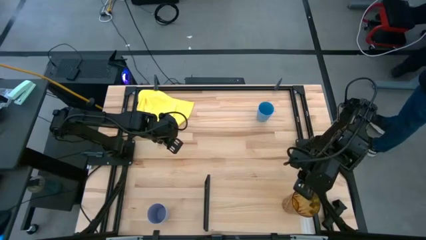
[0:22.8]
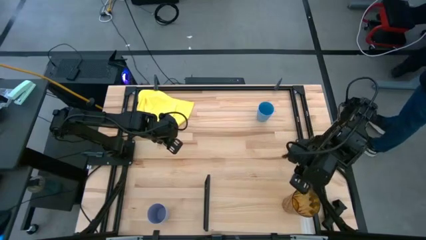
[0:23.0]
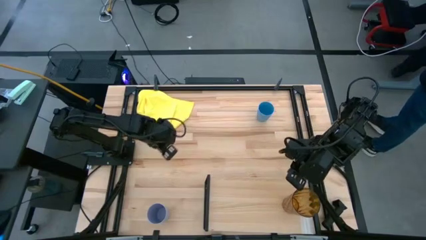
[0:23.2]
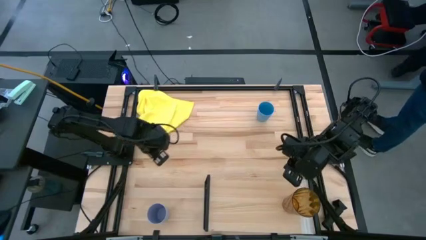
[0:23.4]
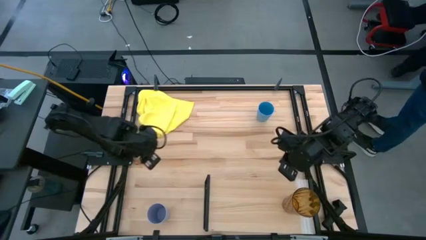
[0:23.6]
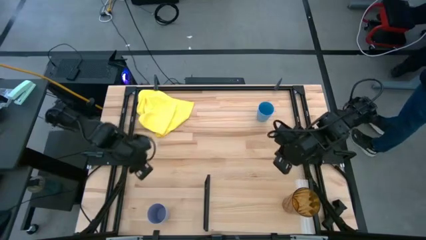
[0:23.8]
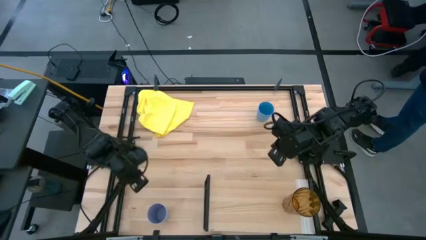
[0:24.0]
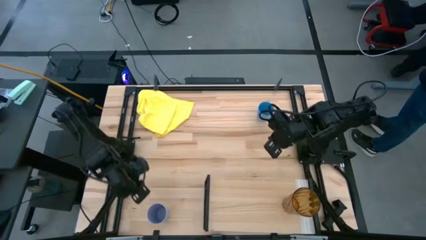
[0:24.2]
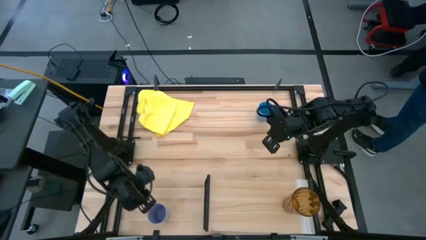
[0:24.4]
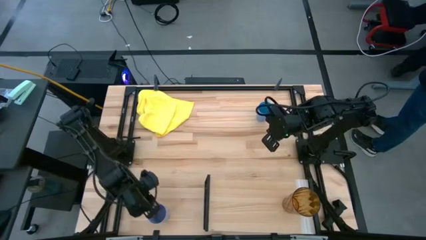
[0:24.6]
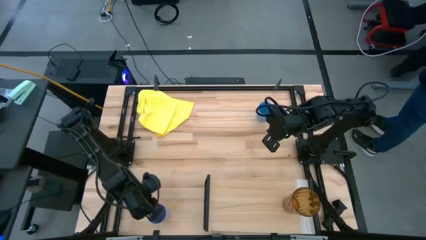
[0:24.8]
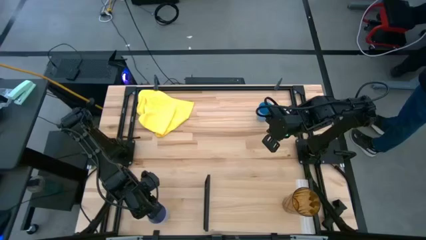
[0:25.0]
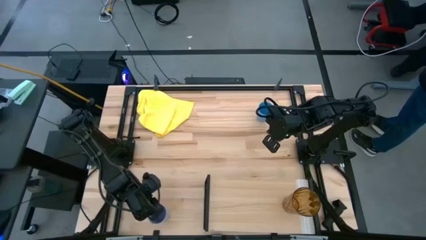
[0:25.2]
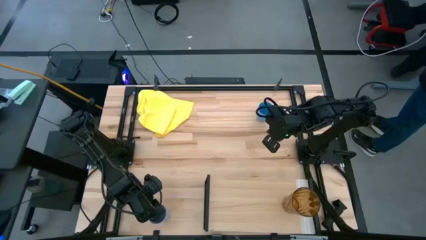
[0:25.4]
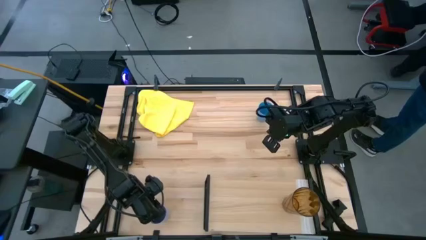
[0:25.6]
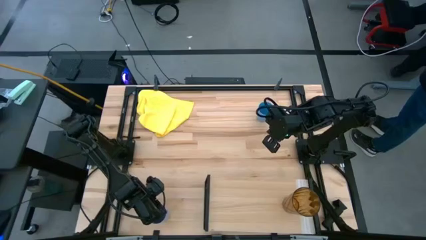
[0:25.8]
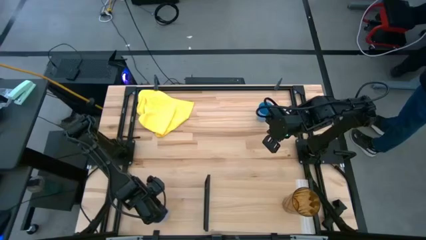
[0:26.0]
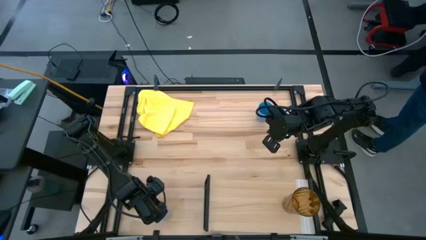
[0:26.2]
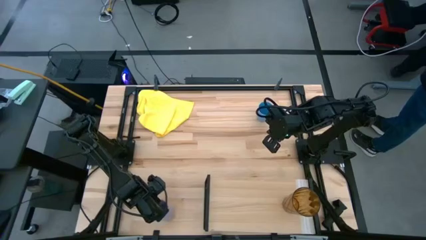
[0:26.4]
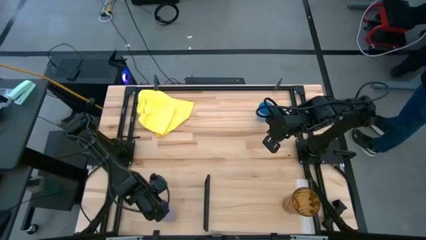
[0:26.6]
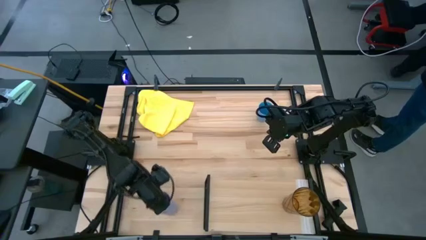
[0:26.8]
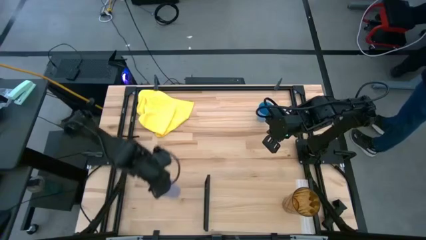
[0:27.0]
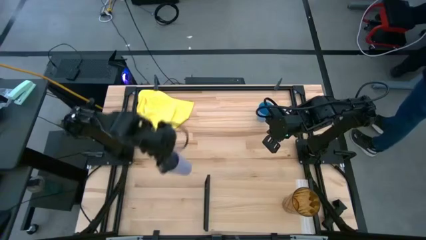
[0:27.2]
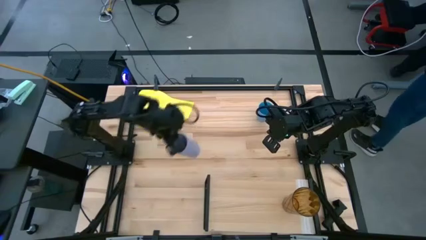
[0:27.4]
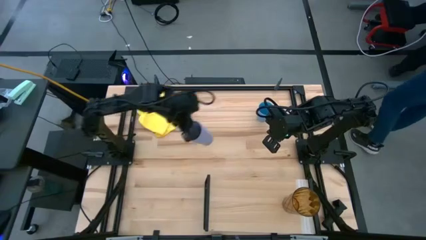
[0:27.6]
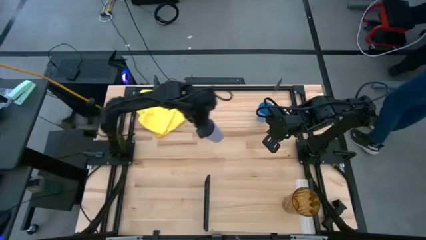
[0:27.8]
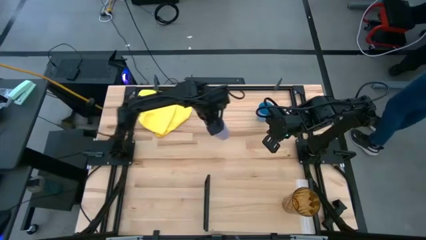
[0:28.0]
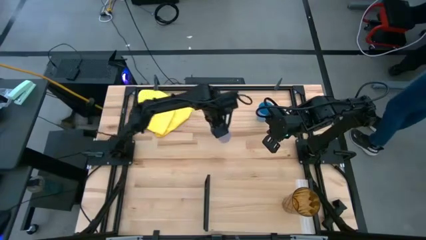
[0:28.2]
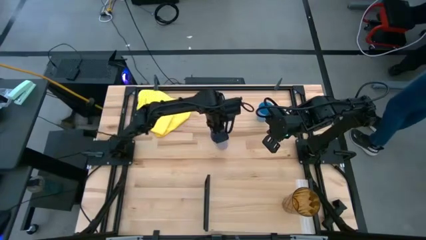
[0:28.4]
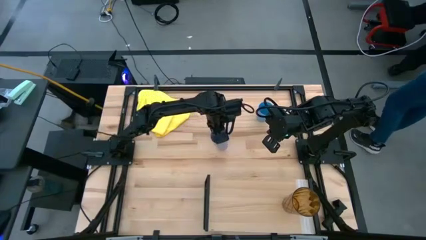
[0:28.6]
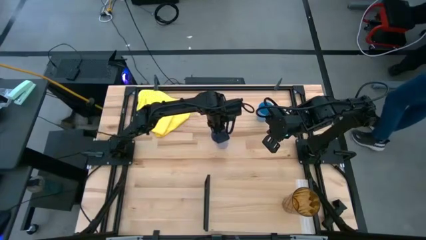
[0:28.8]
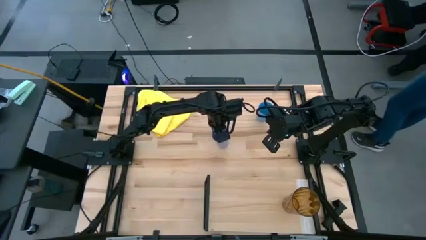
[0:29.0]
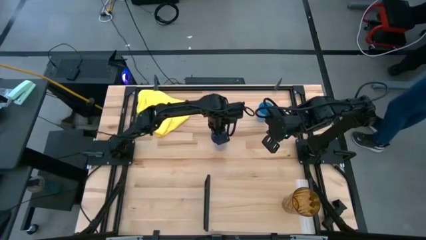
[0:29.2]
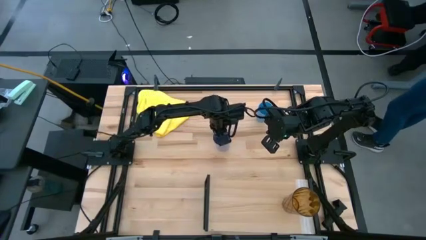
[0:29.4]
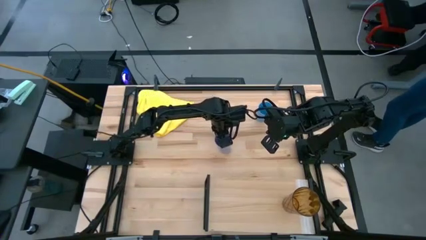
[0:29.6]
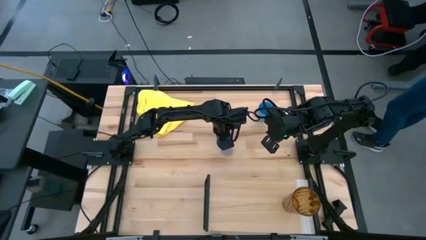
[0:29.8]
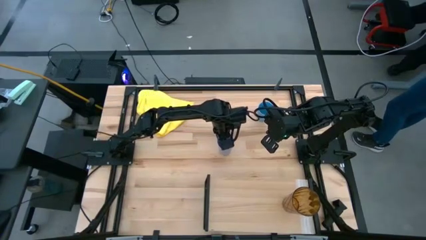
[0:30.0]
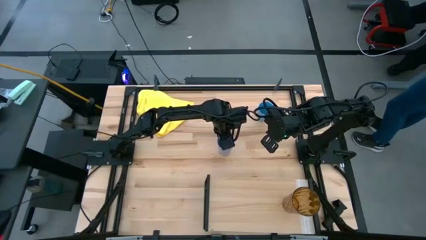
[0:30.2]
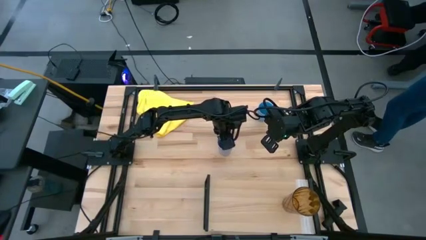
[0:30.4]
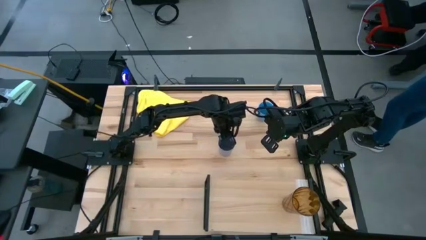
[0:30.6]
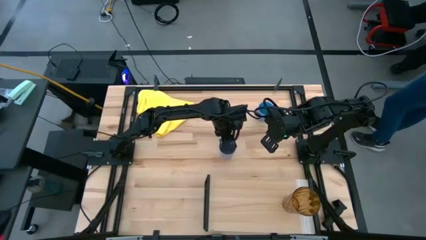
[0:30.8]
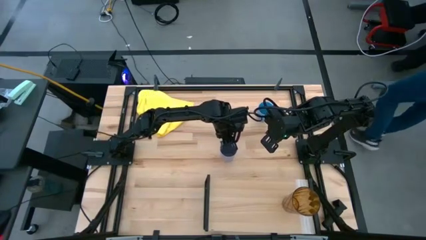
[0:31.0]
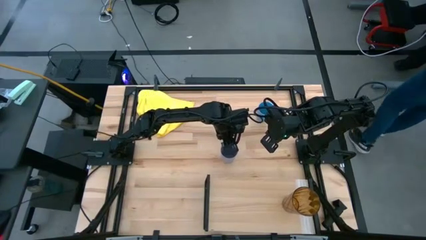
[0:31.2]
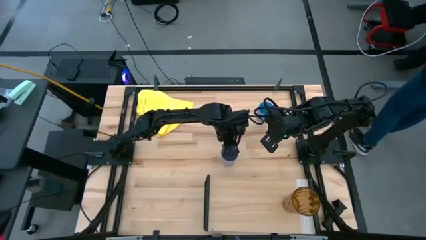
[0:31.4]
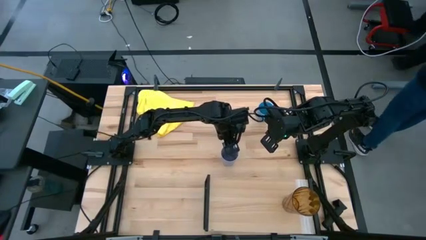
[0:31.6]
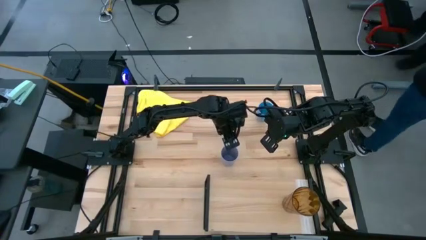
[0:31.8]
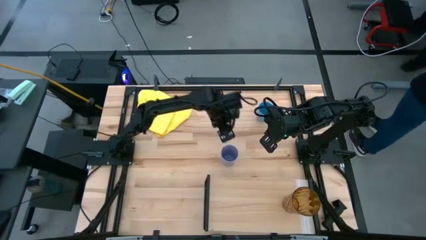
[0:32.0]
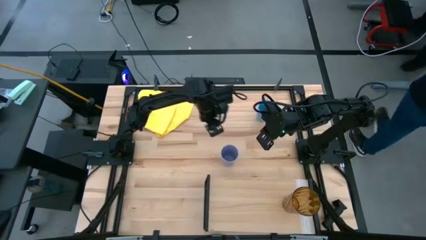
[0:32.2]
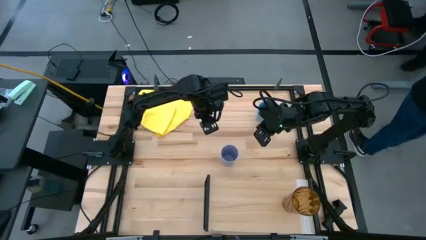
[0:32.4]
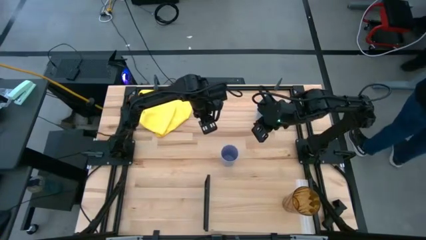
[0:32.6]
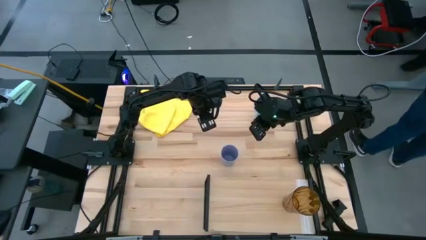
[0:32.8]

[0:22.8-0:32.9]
Task: Stack small to large cups/mugs on shelf
Put the purple cup on the shelf

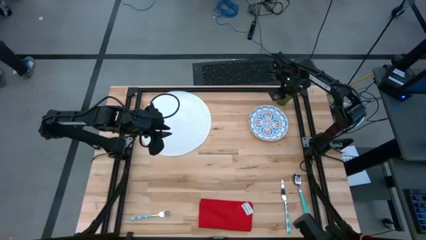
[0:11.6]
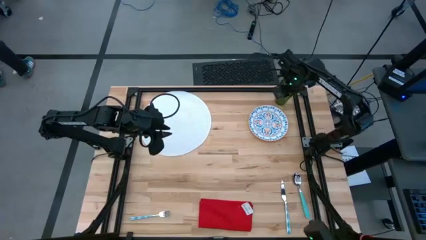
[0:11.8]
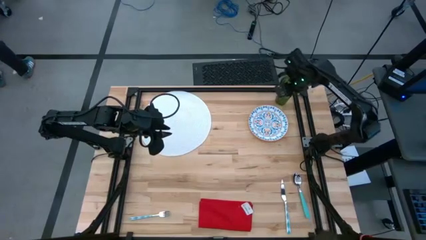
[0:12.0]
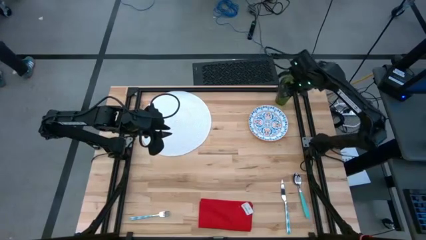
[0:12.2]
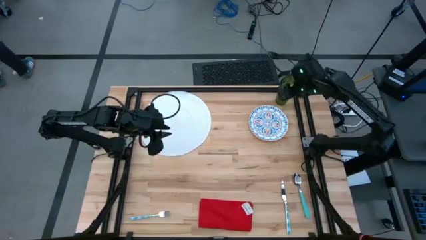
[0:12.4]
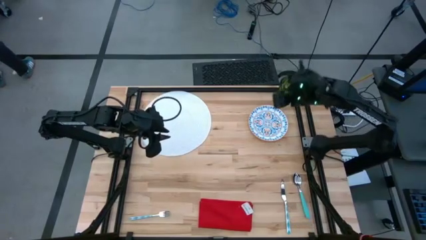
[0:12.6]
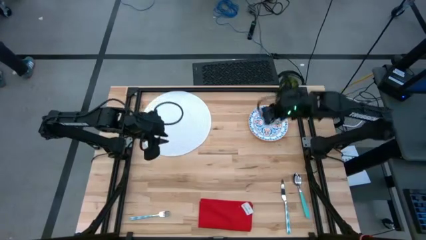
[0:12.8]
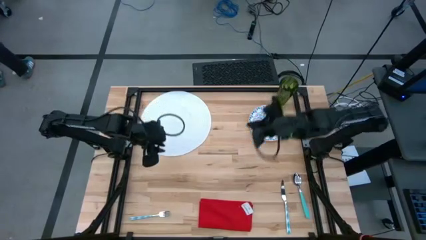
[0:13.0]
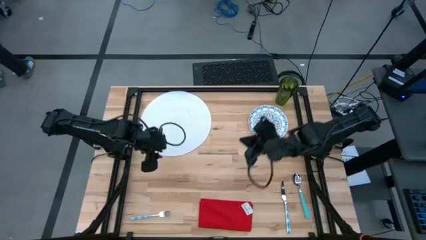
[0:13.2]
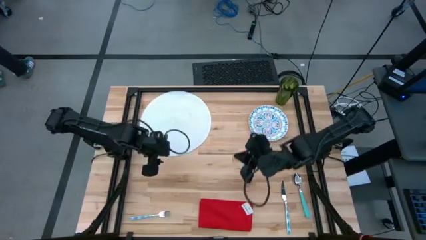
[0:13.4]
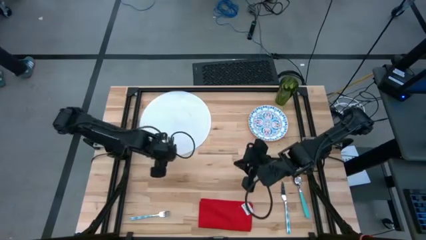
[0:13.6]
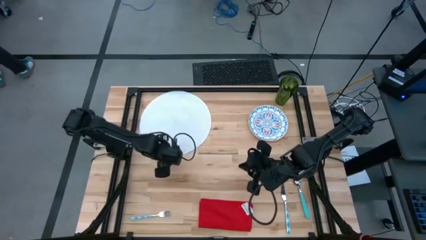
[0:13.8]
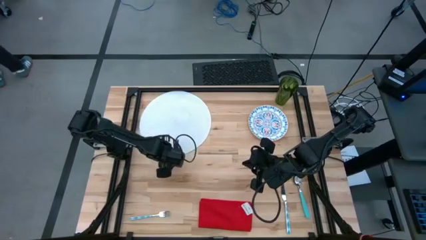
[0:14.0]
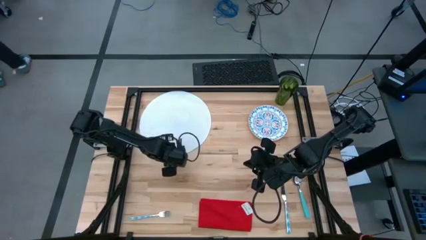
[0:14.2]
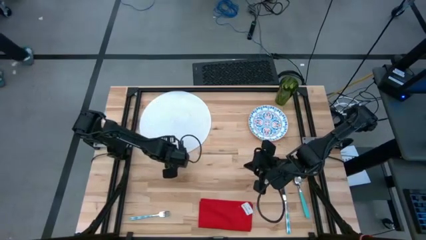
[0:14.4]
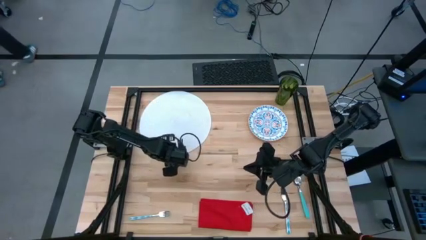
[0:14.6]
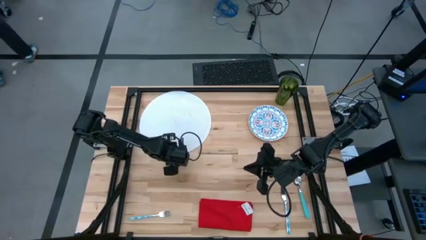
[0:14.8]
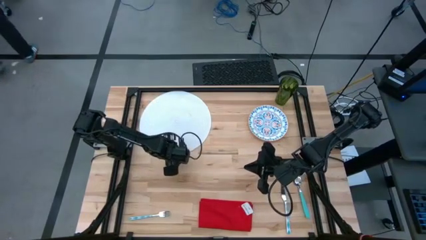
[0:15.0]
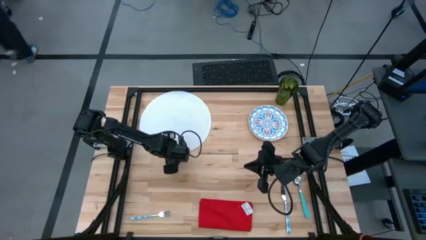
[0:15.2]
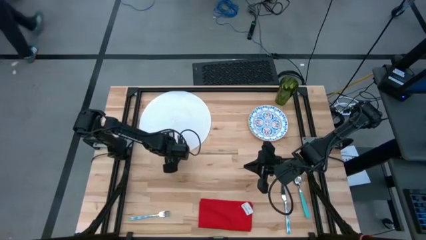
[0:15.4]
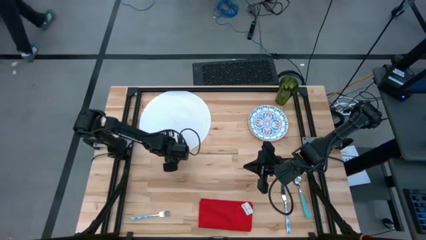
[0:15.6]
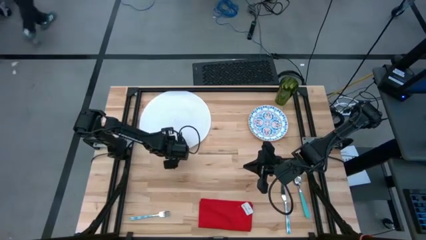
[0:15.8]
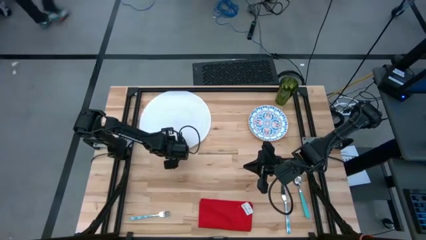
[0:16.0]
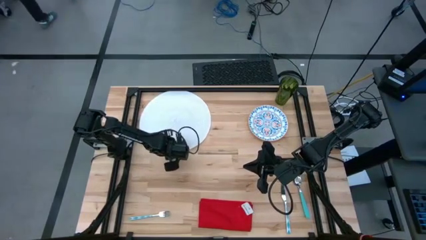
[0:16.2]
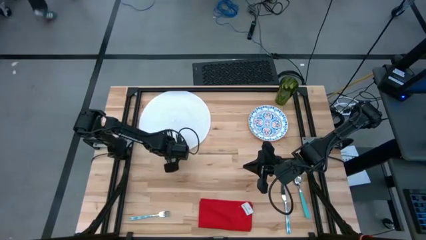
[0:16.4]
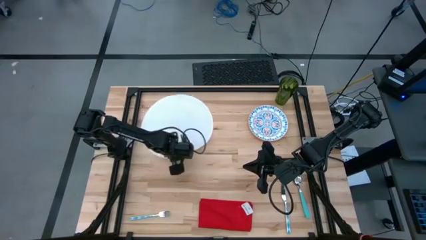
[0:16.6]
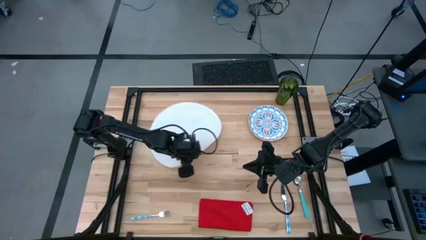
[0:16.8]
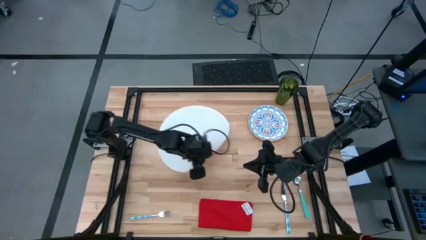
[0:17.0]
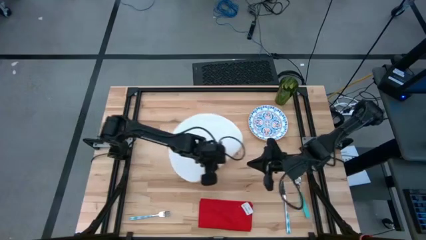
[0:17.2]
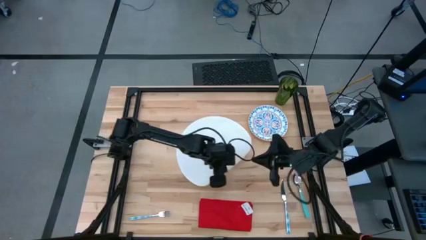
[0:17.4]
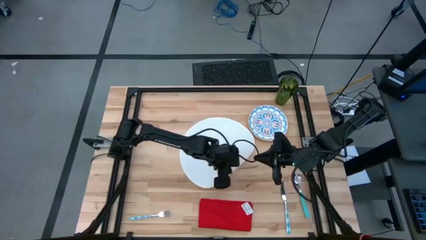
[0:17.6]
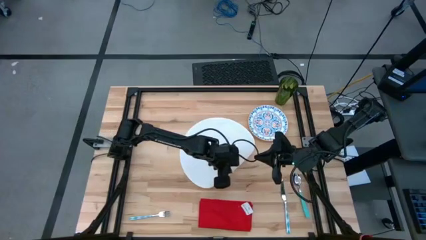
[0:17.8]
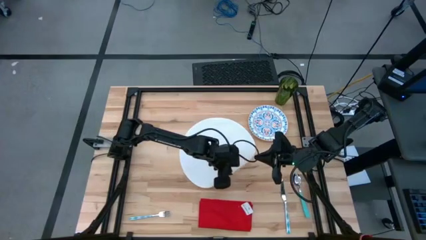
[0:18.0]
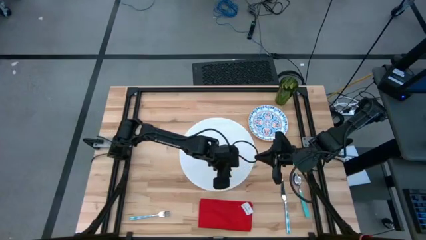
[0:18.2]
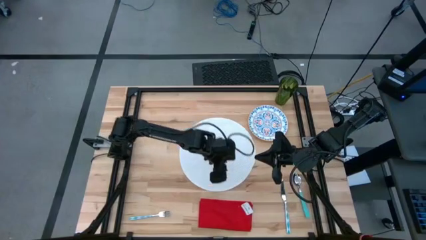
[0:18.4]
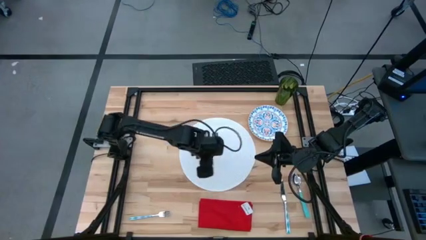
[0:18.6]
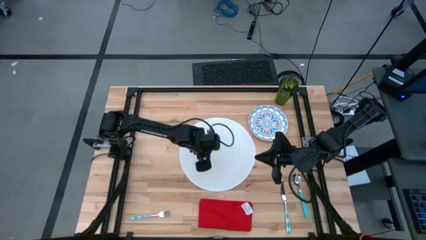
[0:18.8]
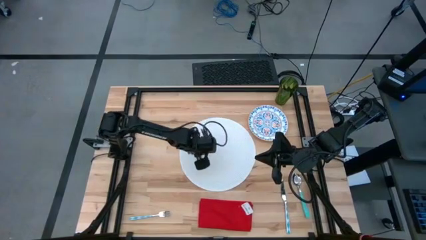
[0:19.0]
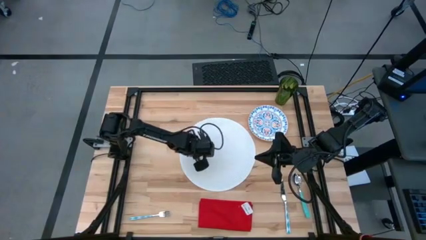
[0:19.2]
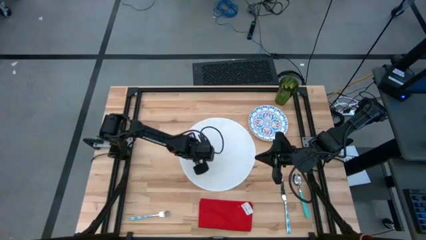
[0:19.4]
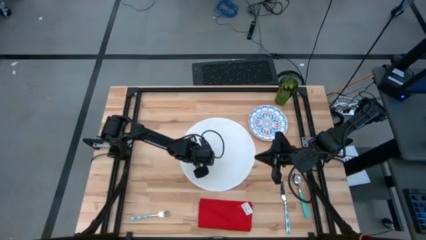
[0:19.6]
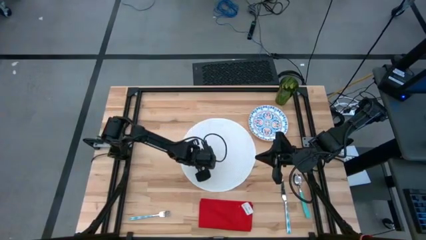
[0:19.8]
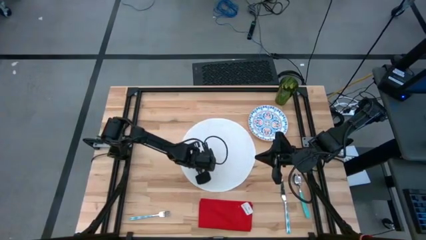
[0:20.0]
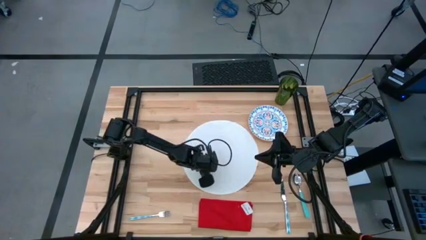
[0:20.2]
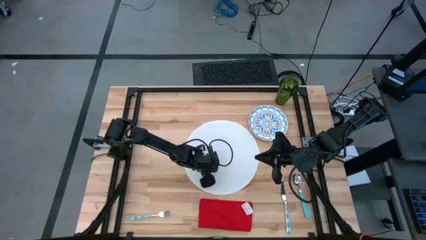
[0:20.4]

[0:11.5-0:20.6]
Task: Set table place
Move the white placemat to the center of the table
